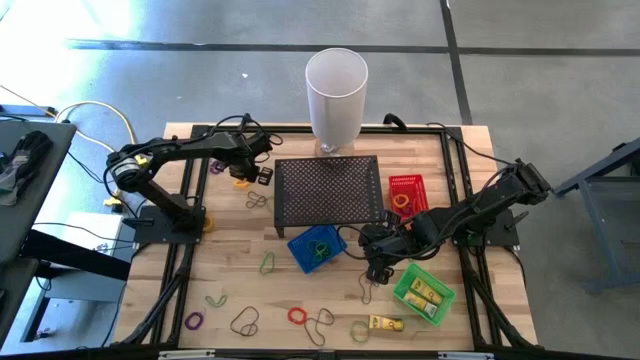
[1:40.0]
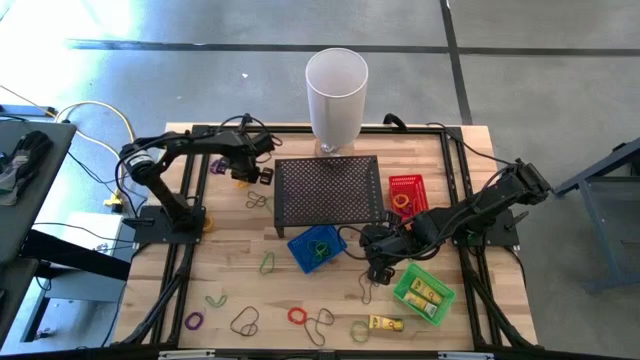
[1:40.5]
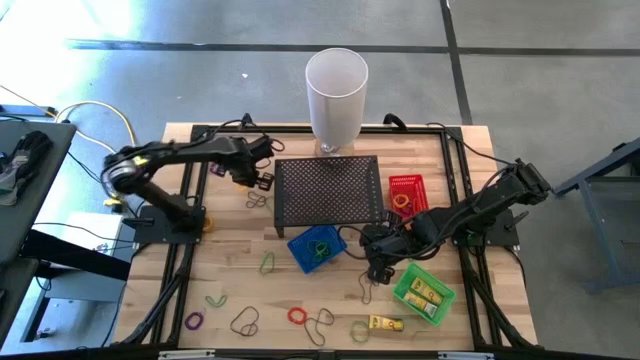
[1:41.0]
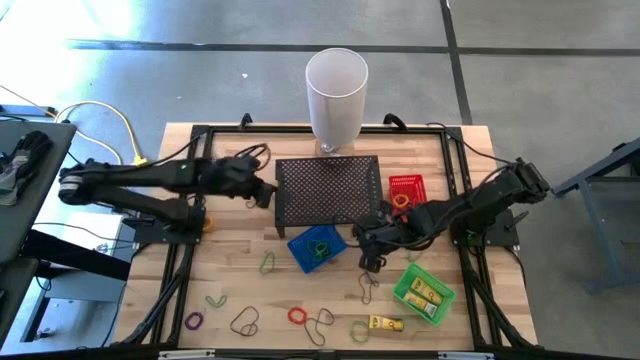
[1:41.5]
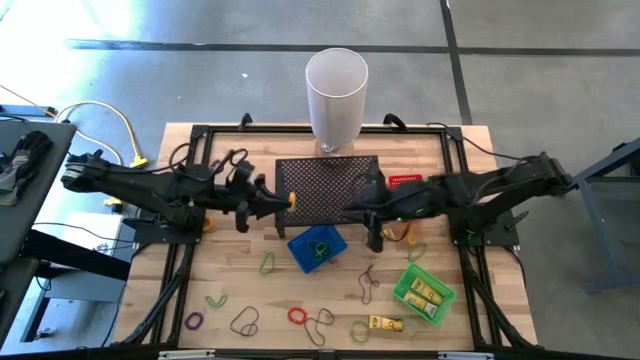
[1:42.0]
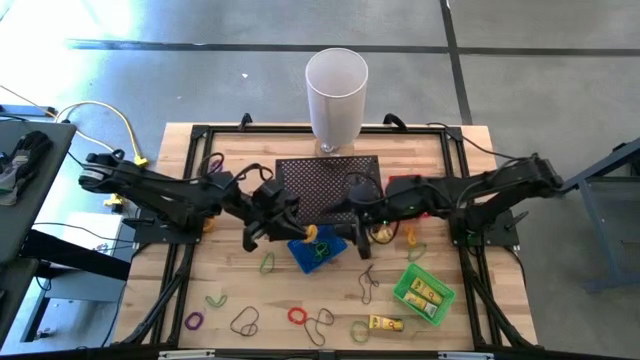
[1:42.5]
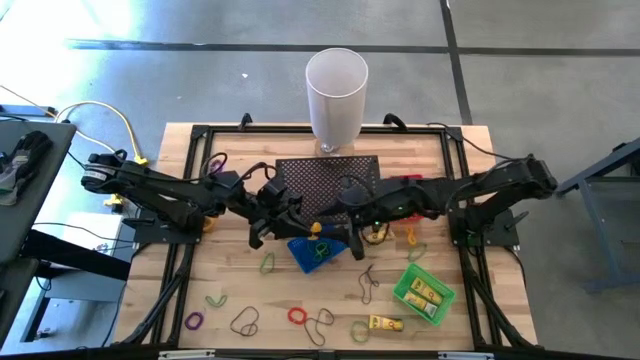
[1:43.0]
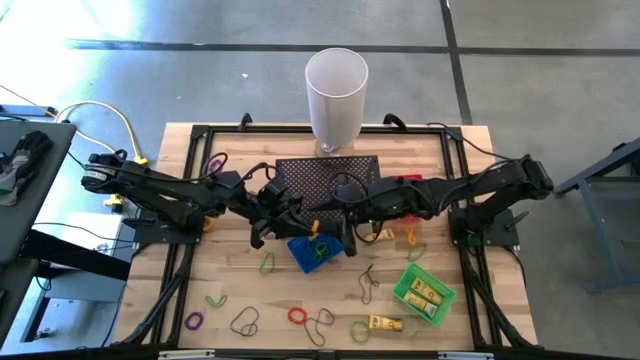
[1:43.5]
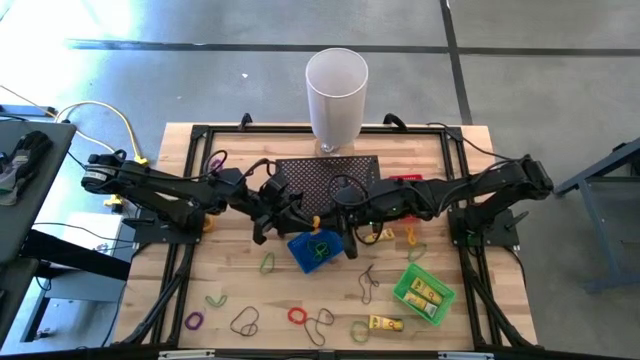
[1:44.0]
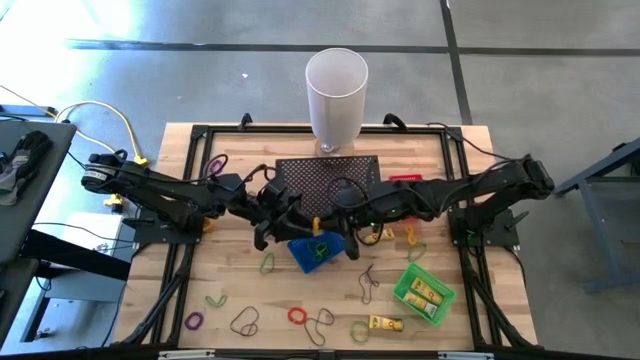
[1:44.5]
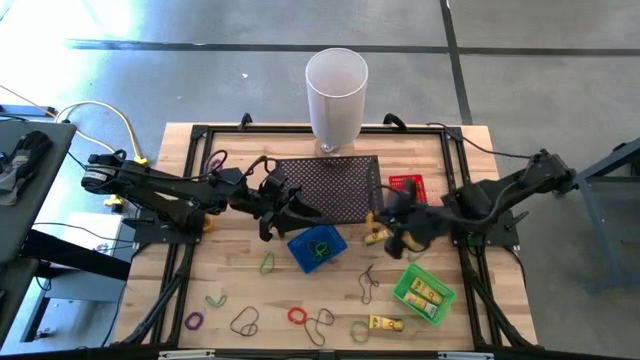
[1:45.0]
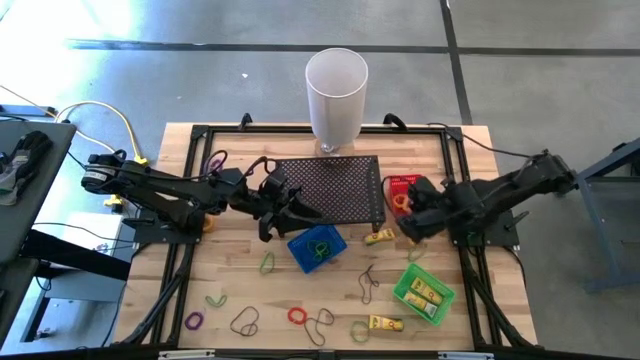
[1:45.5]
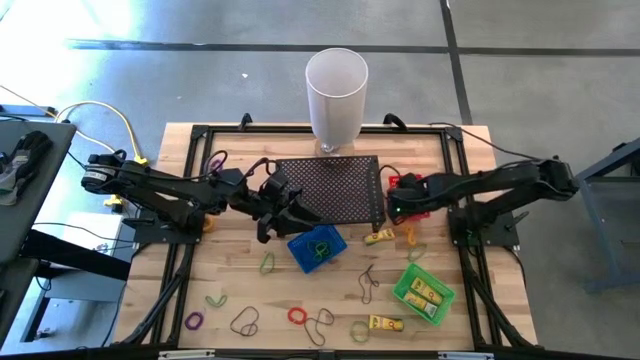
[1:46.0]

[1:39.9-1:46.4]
Task: Pick & Place Office Desk Supplies
Put the yellow spring keychain into the red bin

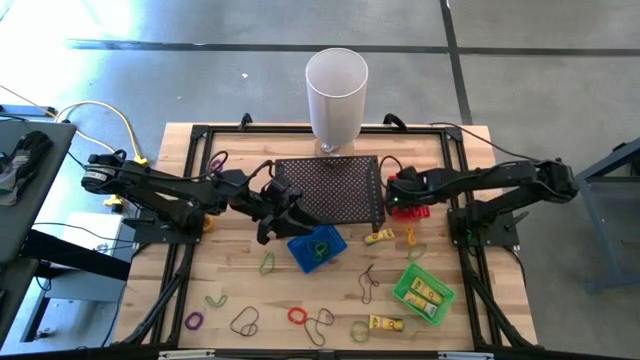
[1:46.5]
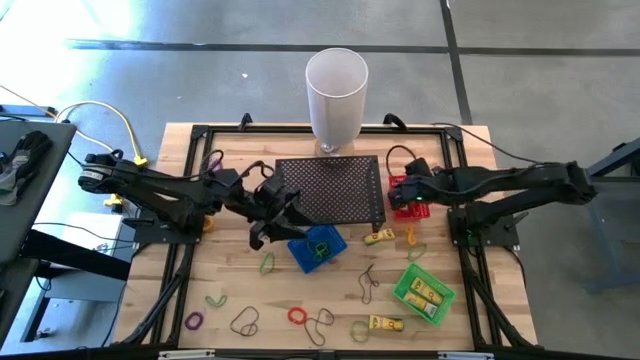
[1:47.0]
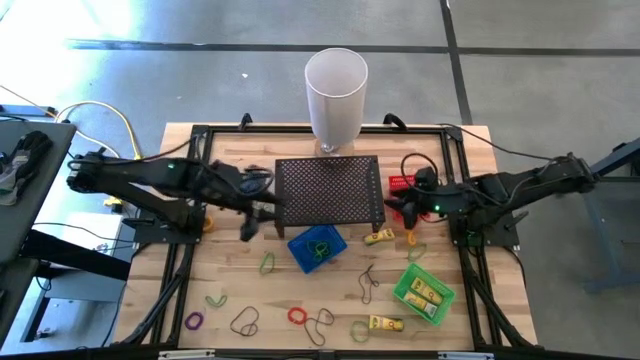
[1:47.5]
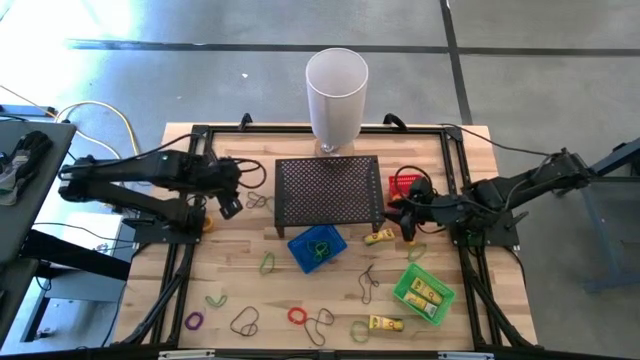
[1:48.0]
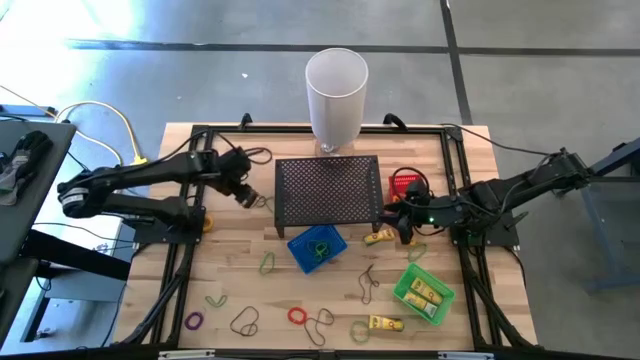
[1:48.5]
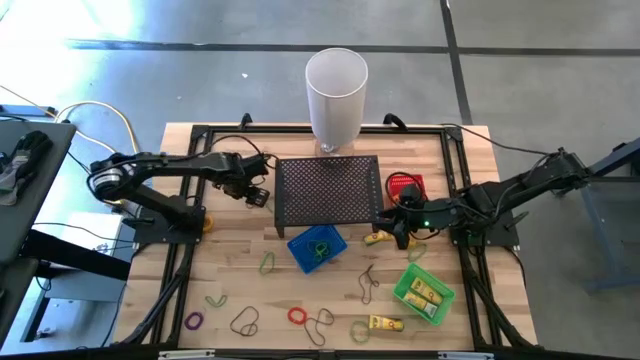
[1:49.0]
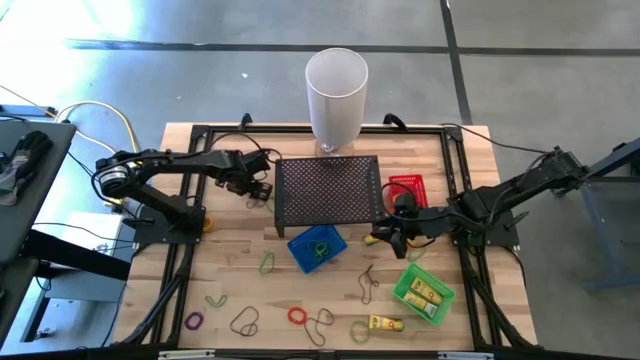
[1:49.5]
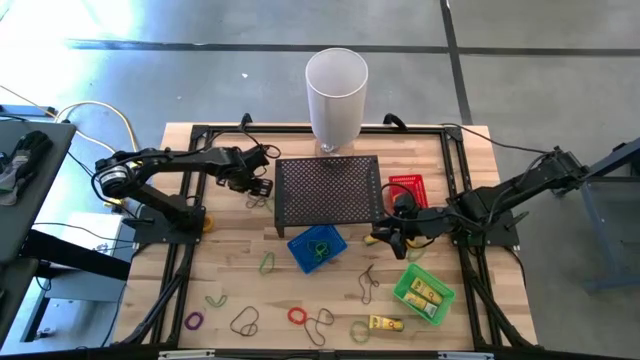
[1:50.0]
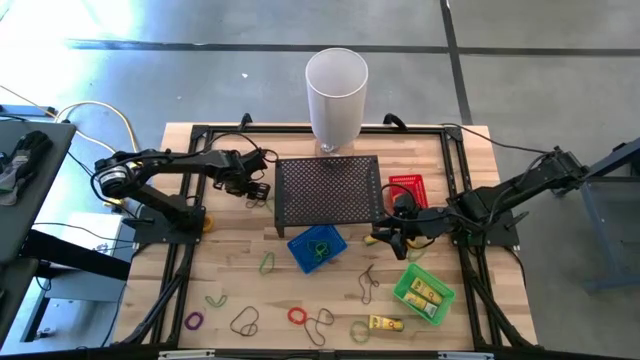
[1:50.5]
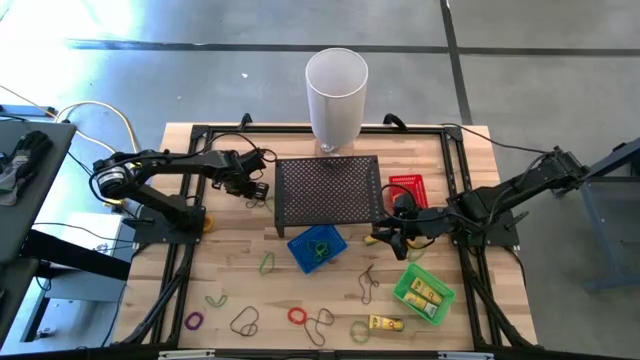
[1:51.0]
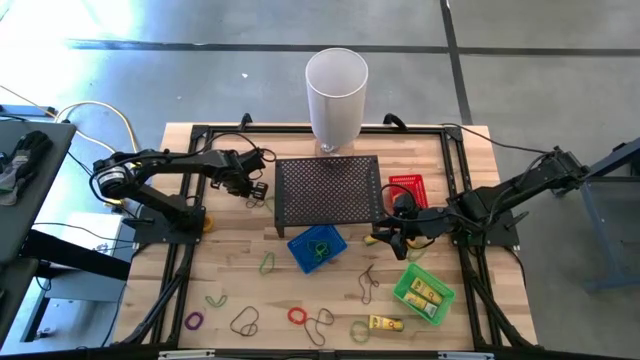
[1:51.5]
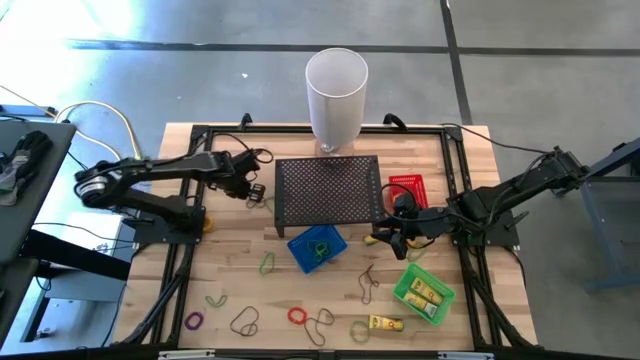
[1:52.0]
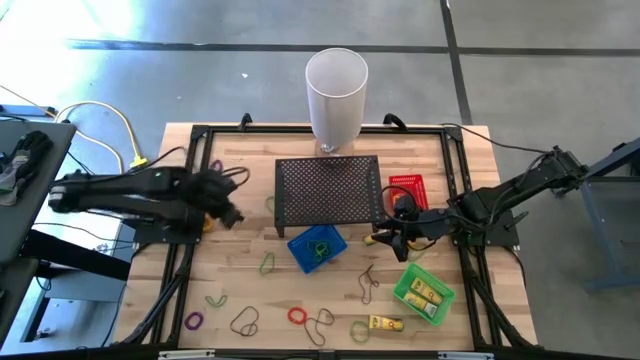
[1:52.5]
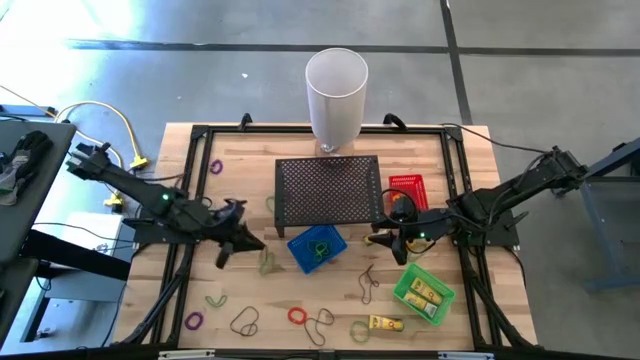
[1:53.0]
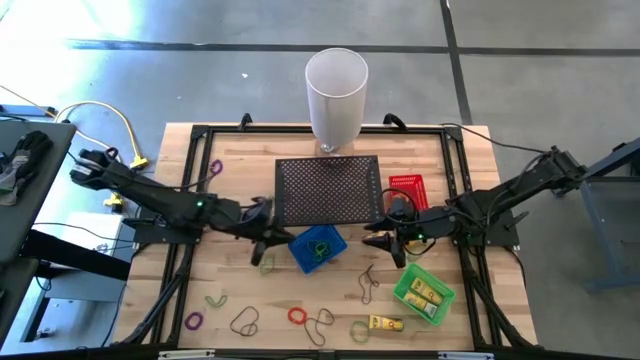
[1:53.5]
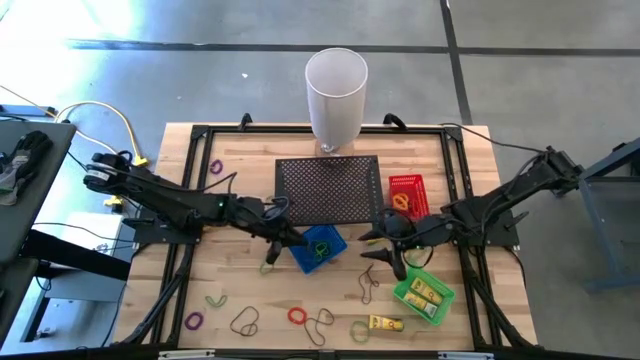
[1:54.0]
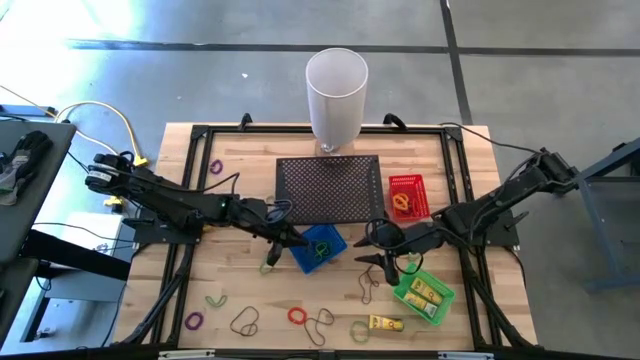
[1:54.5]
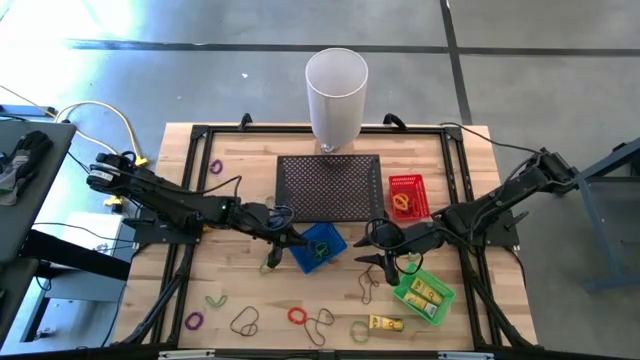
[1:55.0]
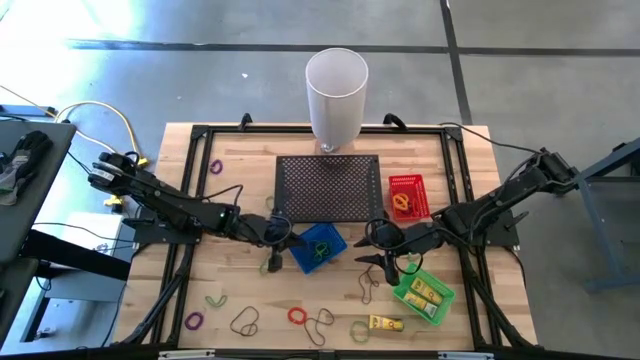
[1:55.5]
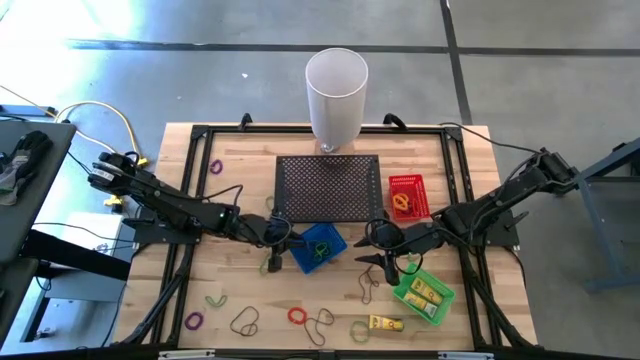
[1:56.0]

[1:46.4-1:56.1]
Put the violet rubber band into the blue bin

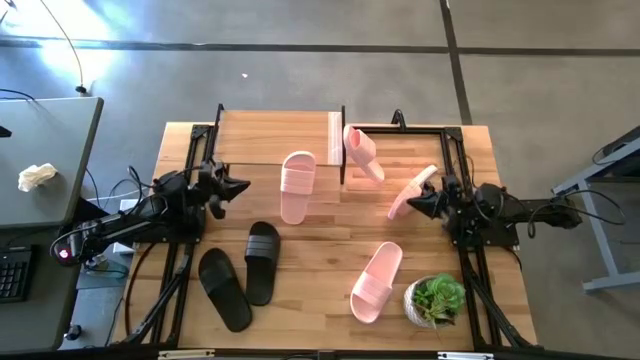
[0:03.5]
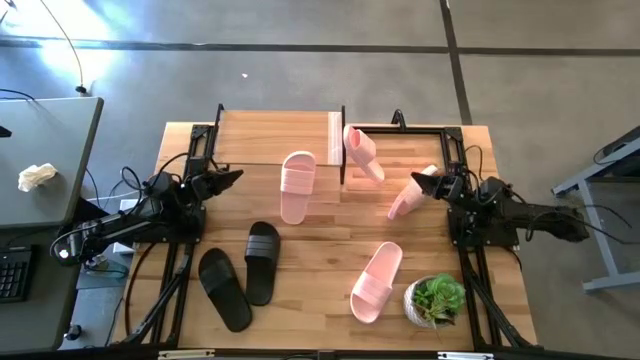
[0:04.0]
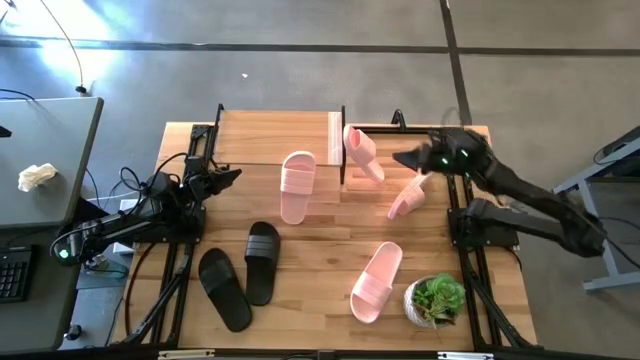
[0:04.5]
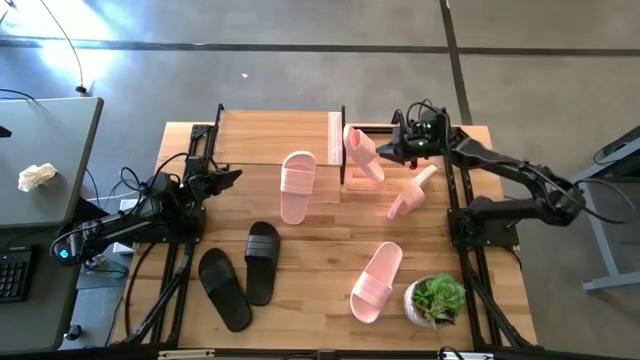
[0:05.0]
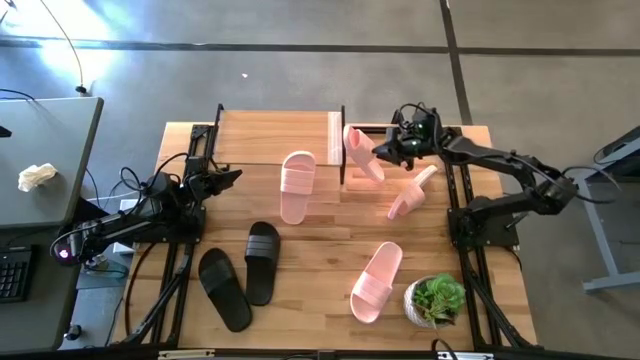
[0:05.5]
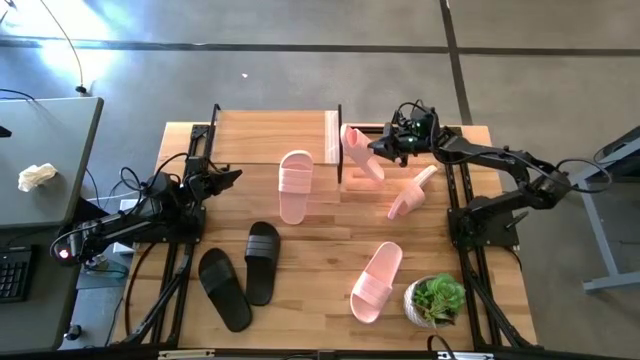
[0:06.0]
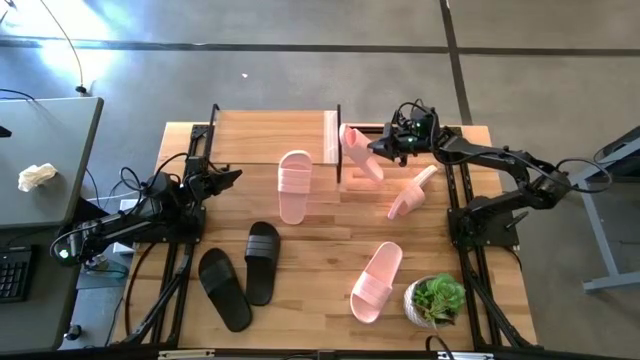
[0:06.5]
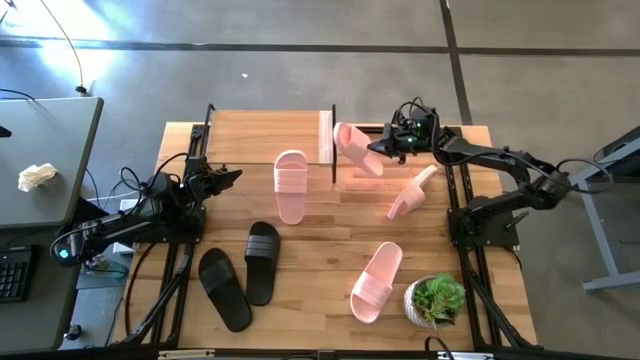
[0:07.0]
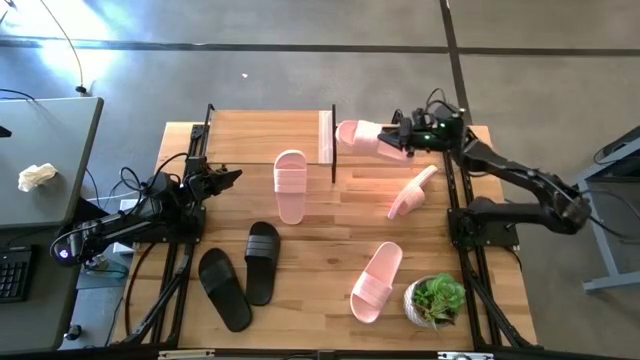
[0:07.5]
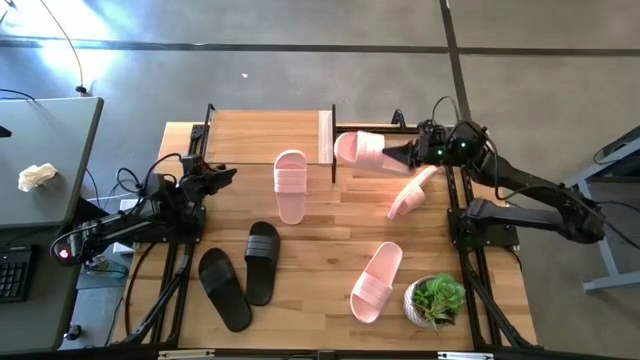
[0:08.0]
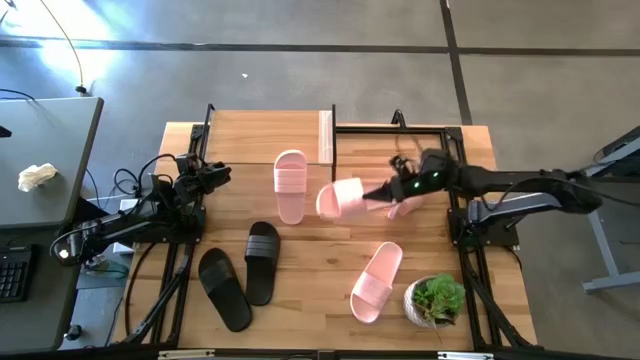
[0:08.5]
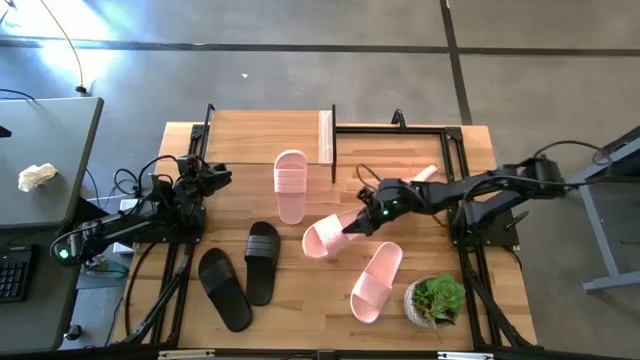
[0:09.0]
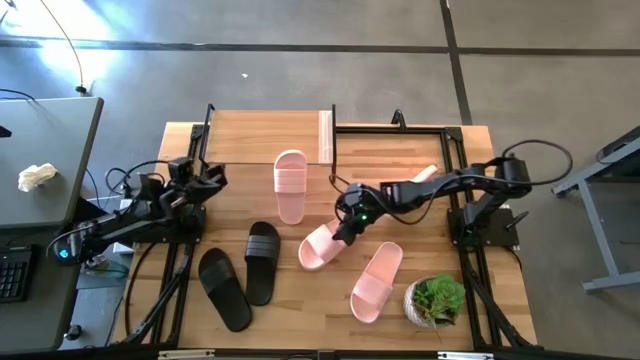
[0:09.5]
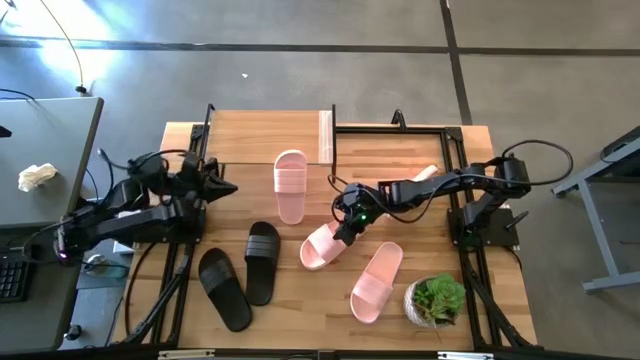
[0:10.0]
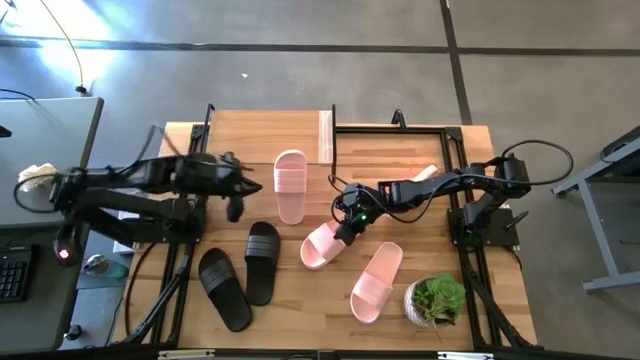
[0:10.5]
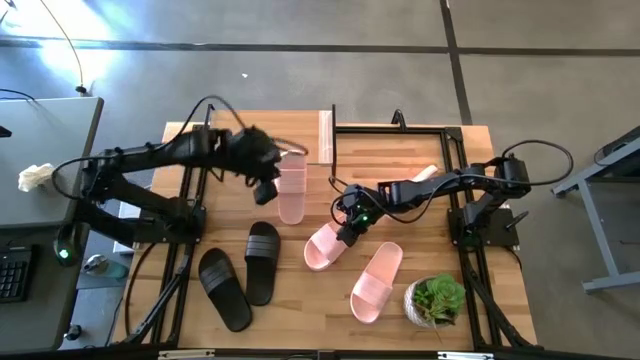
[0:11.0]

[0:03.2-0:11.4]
Task: Pick and place slides into the shelf
Move the pink slide to the middle of the table
